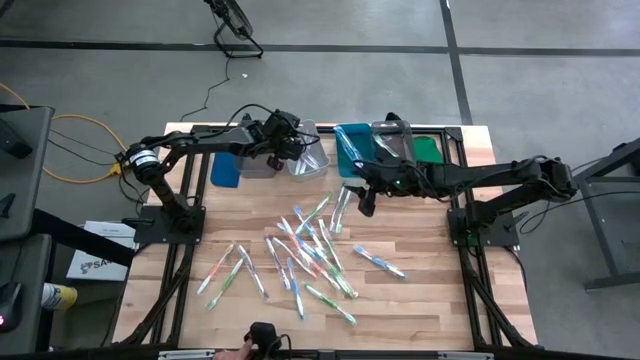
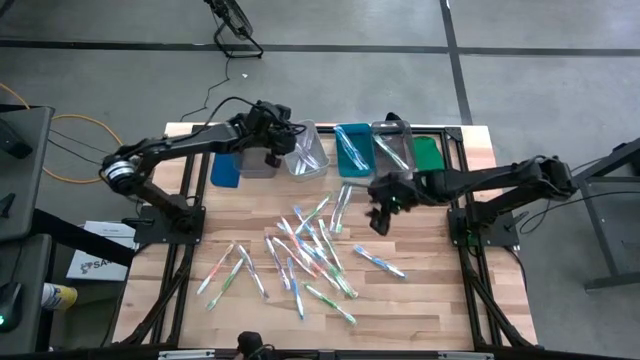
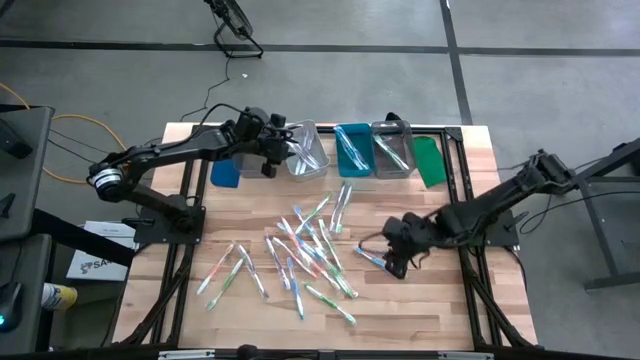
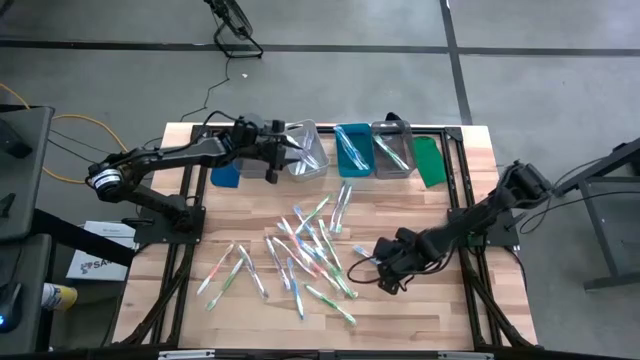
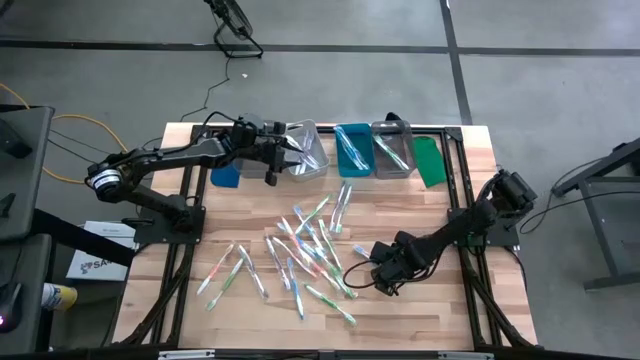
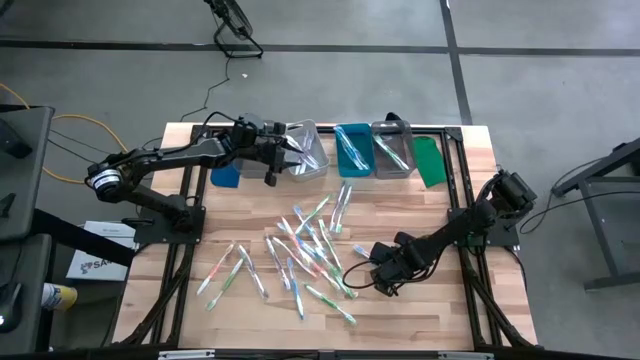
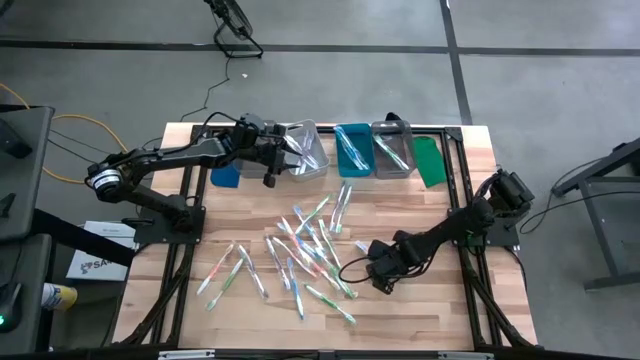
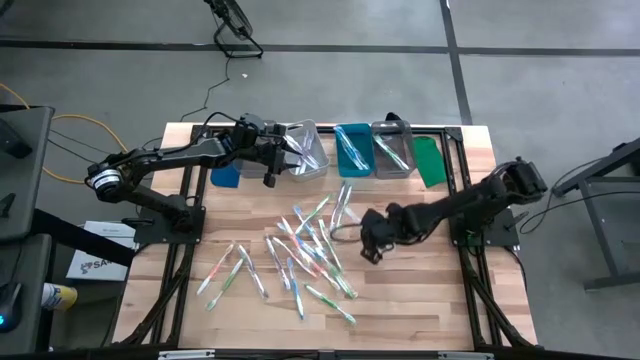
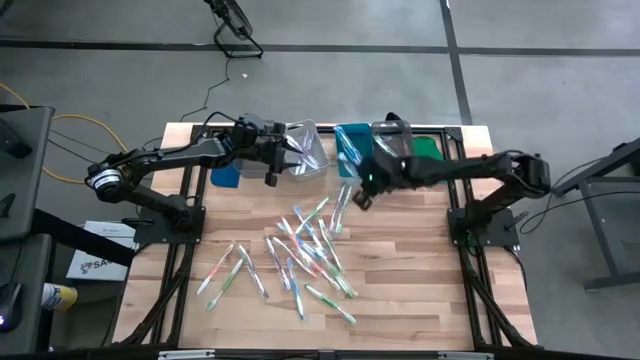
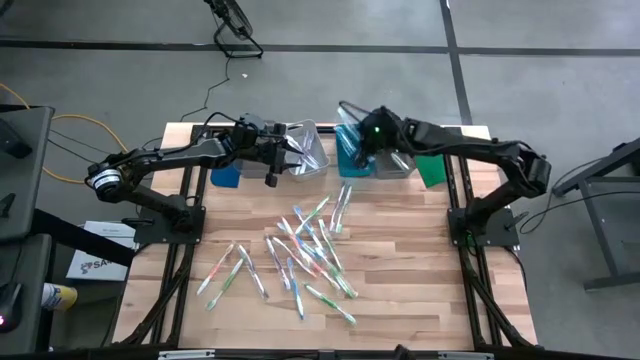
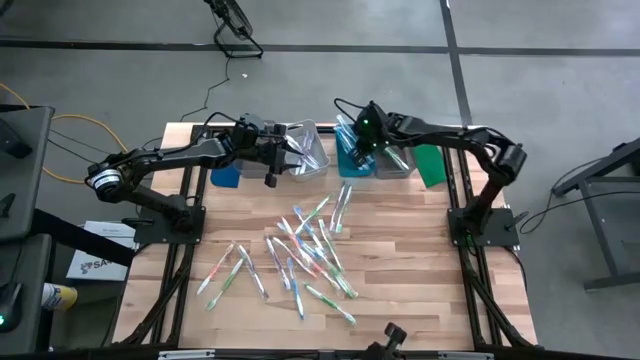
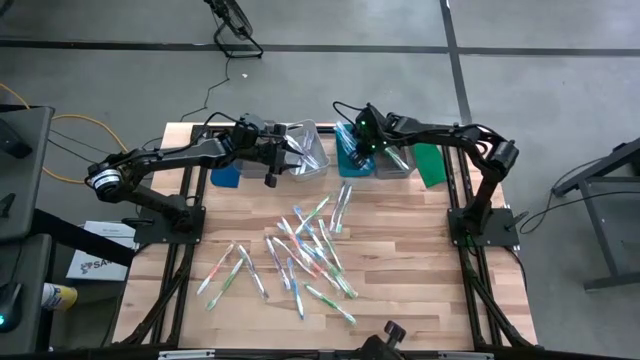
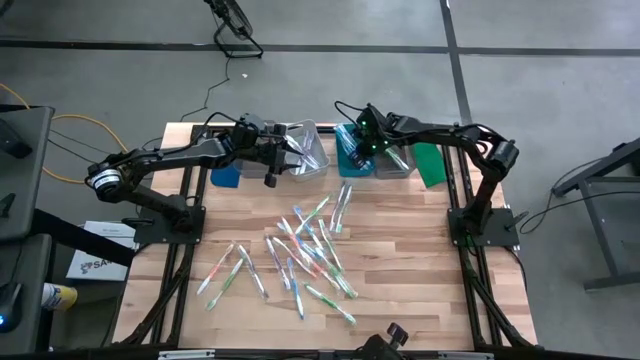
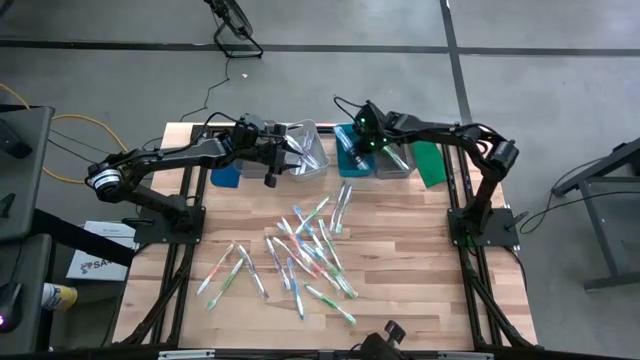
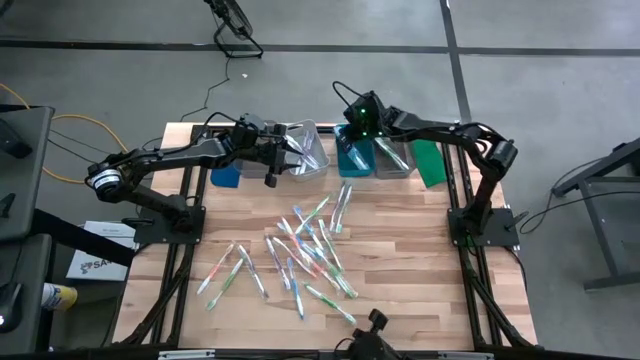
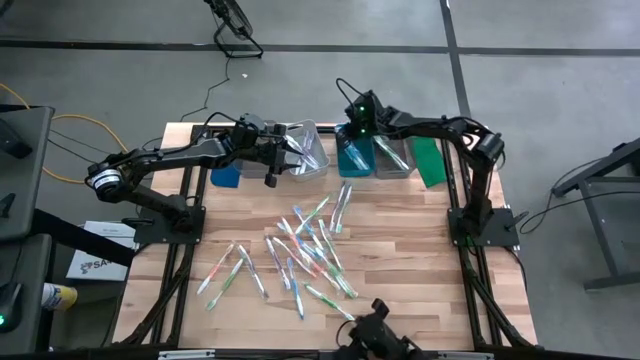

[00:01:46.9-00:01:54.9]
Task: Pick & Place Toothbrushes
Put the blue toothbrush into the blue bin

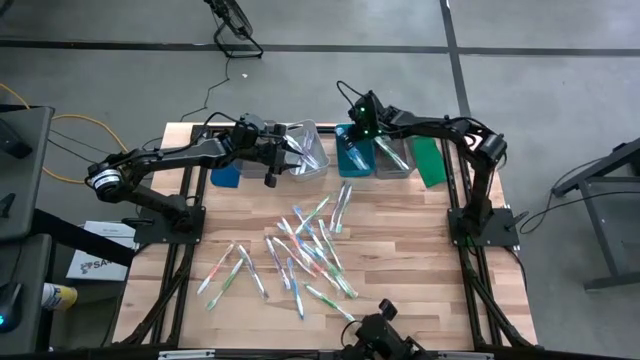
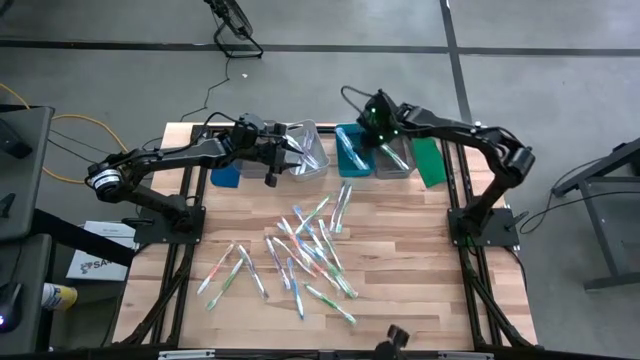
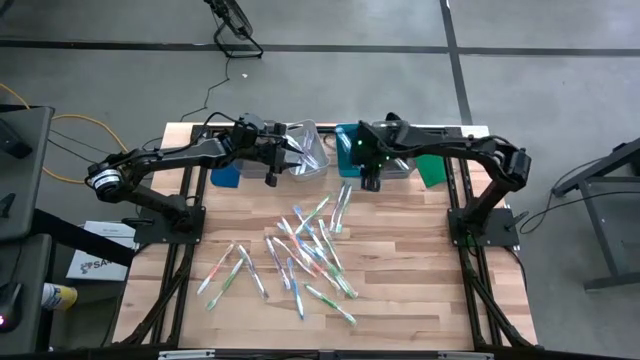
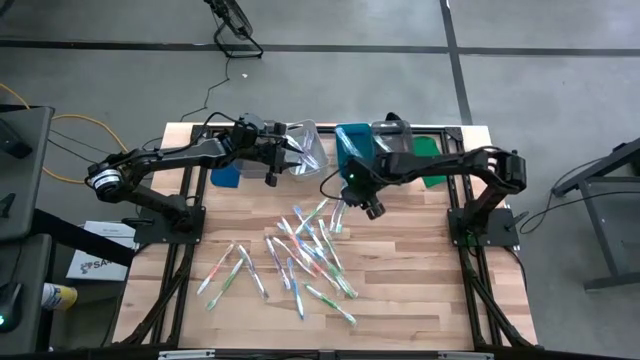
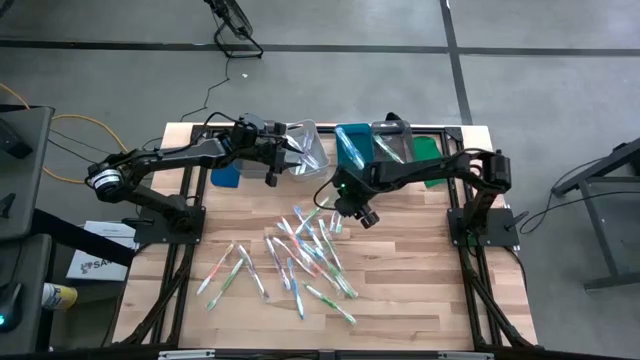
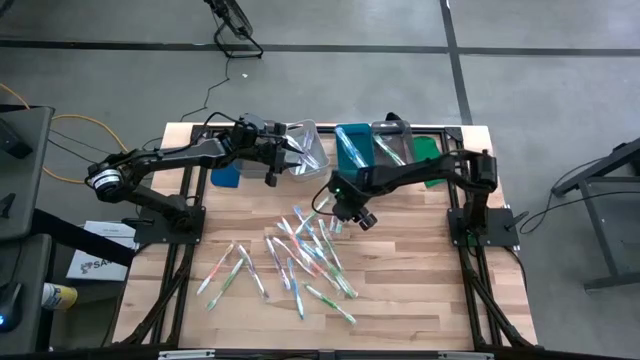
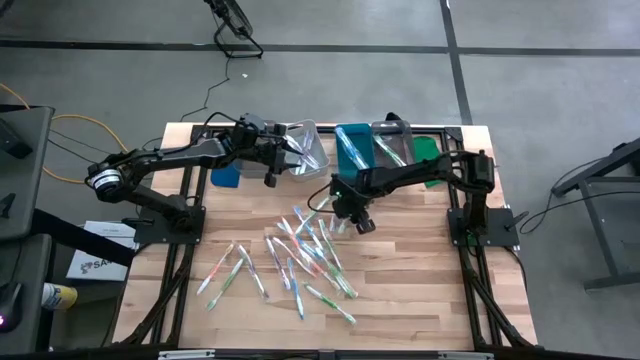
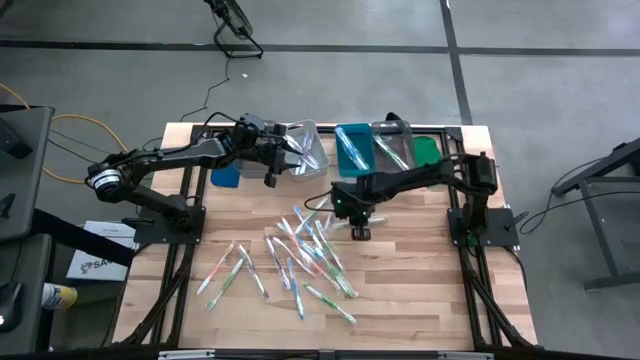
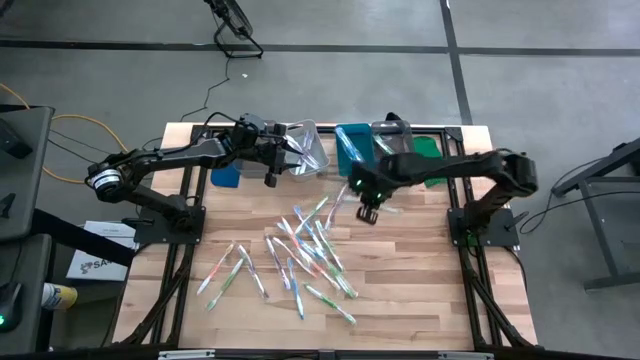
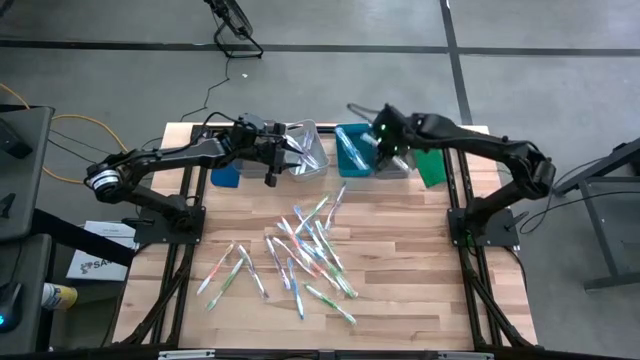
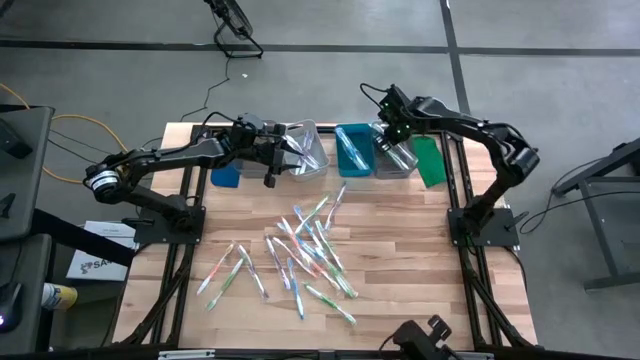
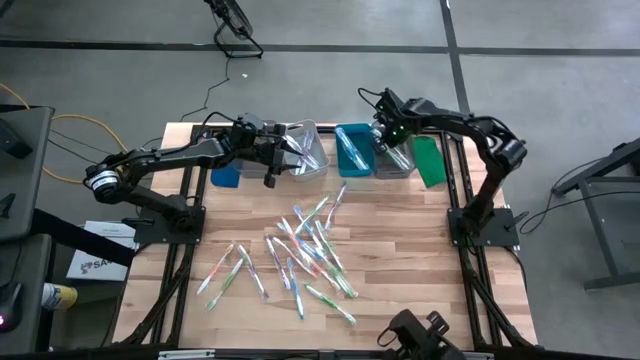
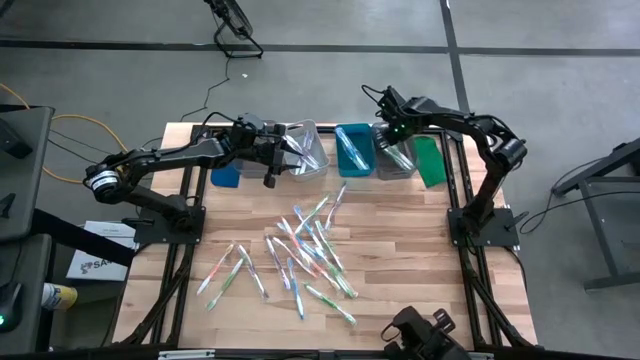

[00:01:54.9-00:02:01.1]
Put the green toothbrush into the right black bin

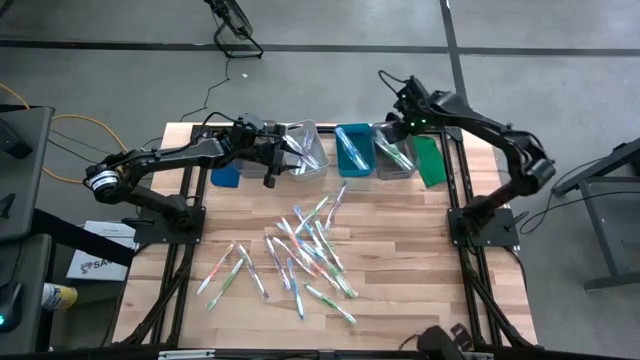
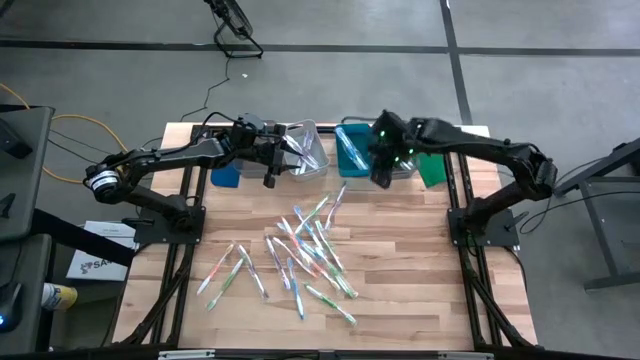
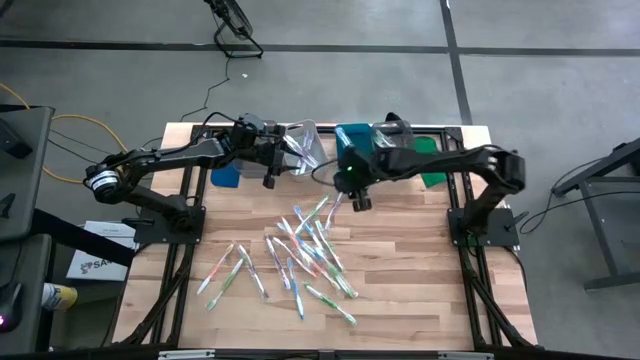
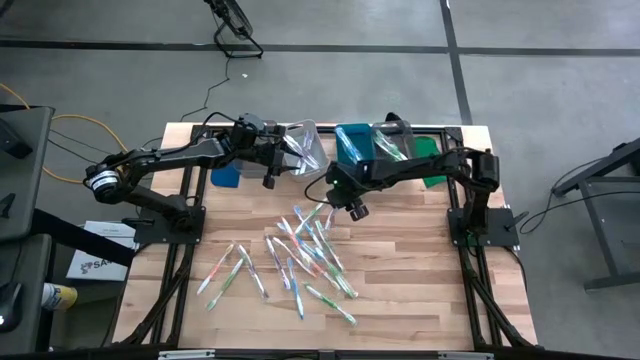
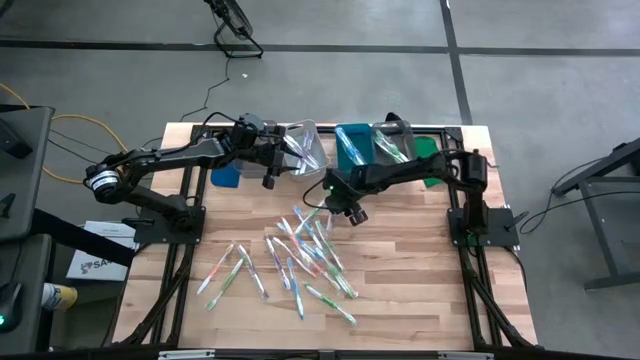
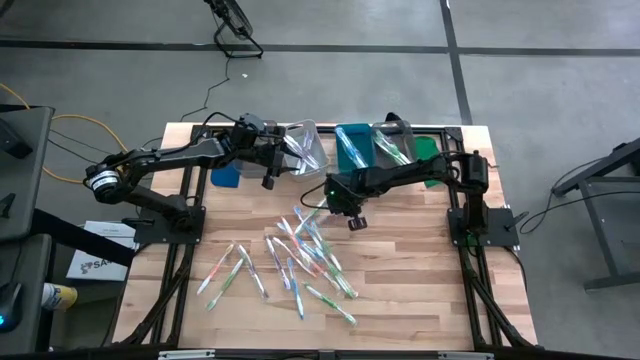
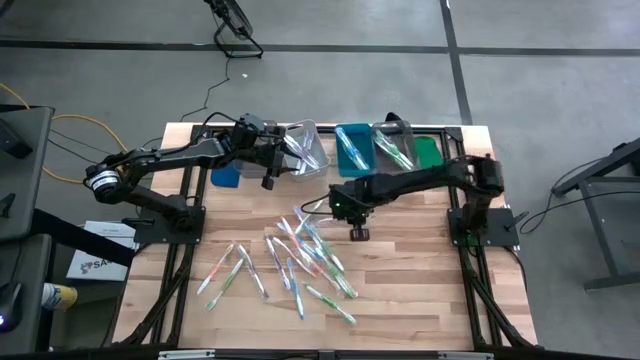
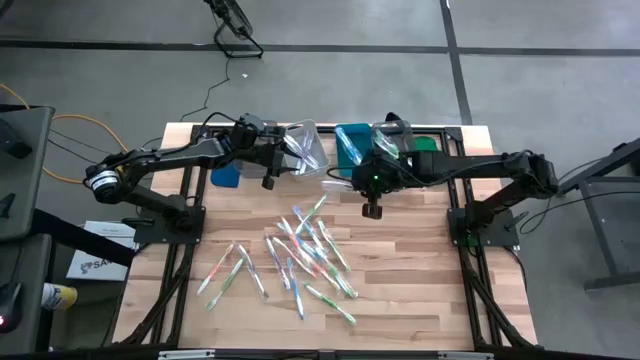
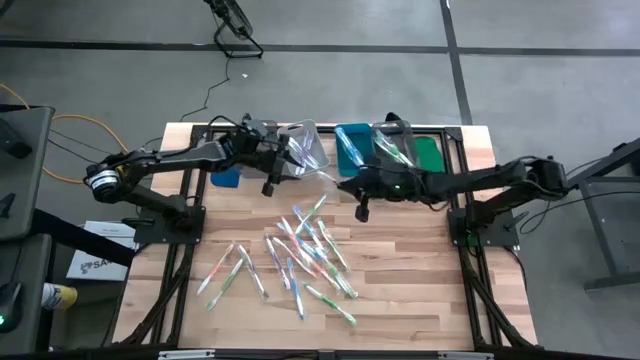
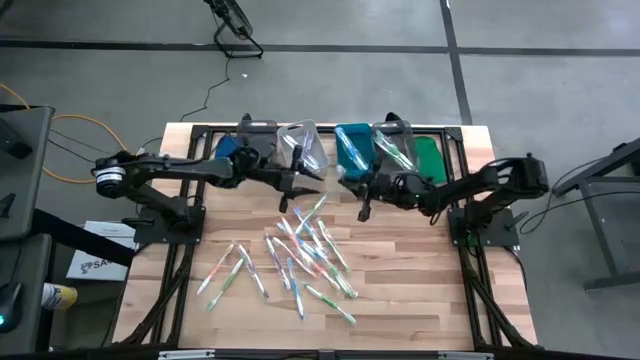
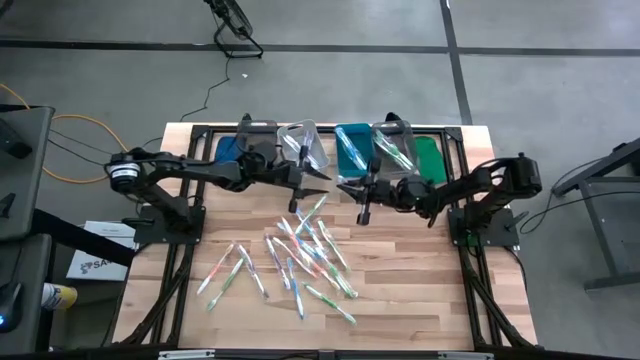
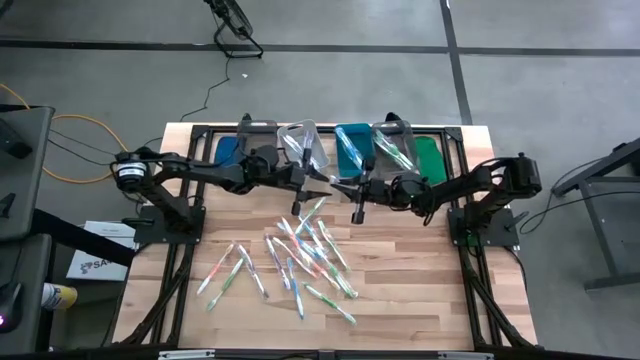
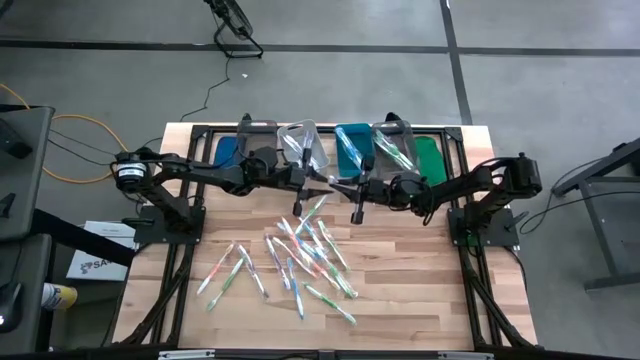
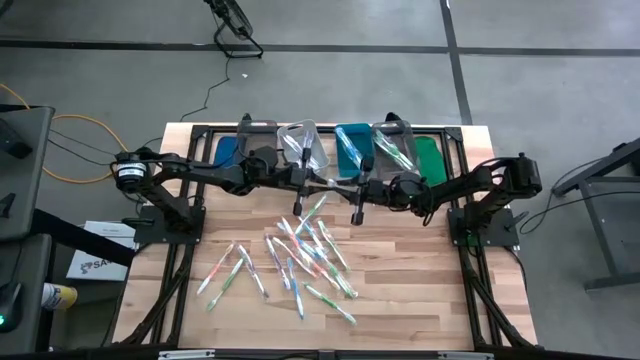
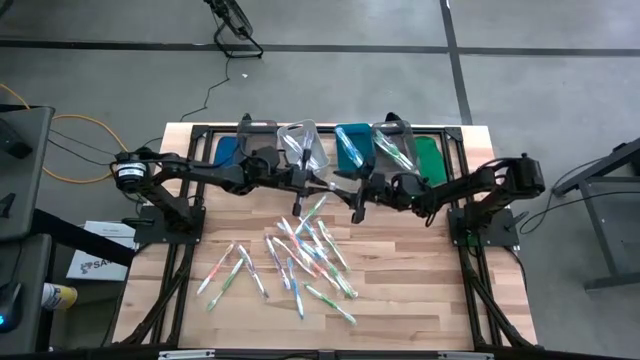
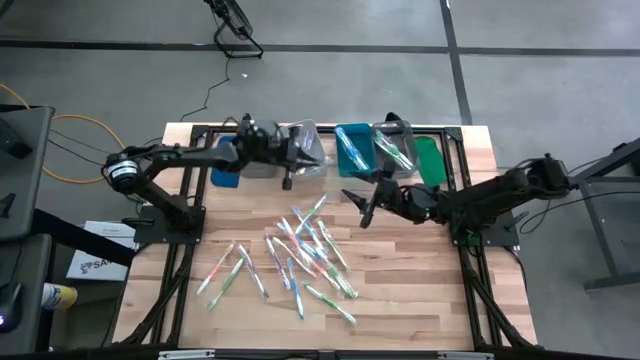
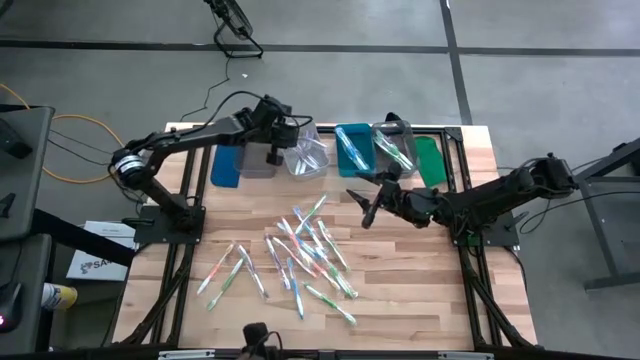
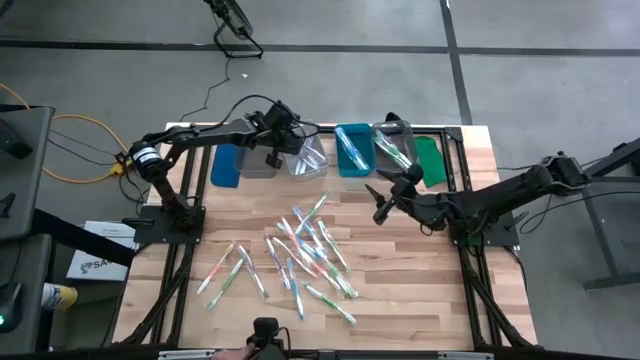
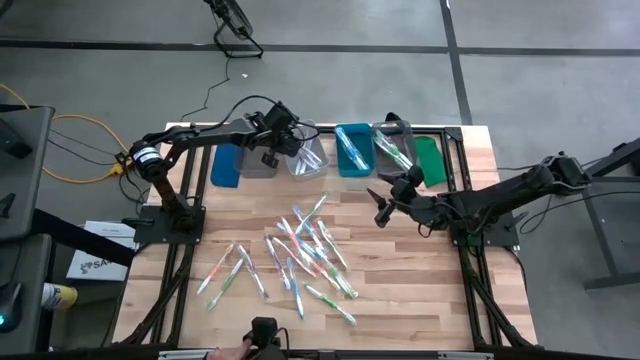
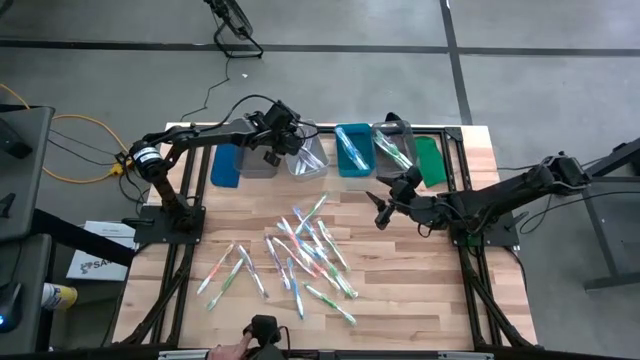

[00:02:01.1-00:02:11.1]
Put the violet toothbrush into the gray bin
